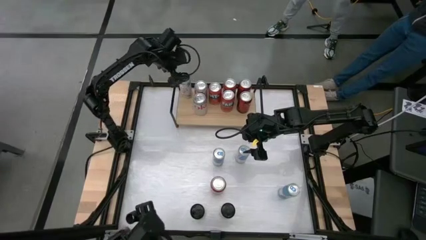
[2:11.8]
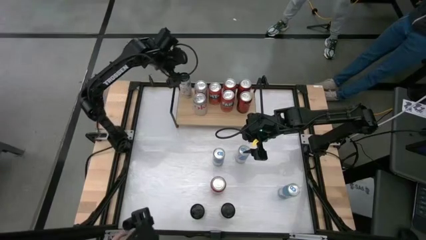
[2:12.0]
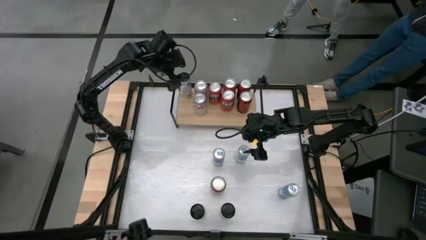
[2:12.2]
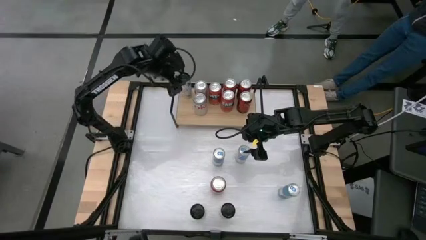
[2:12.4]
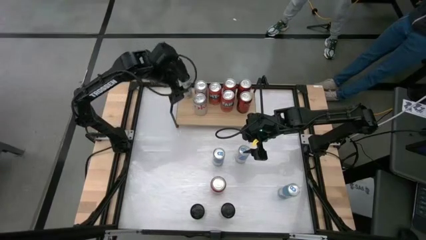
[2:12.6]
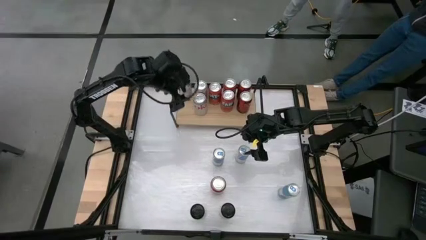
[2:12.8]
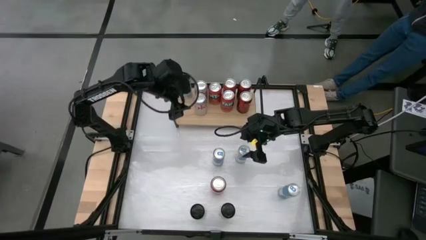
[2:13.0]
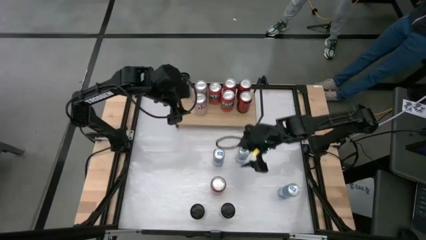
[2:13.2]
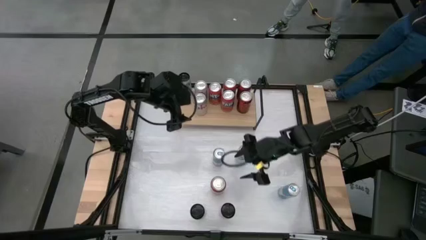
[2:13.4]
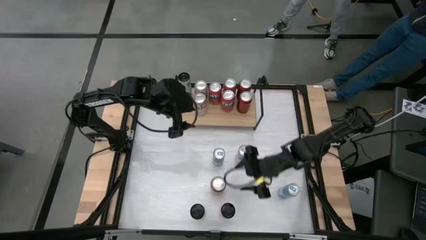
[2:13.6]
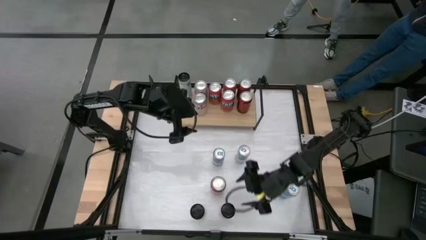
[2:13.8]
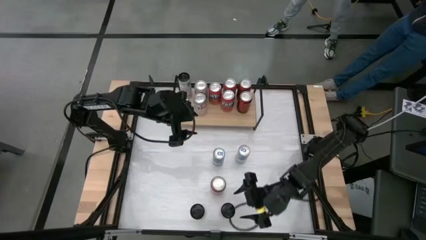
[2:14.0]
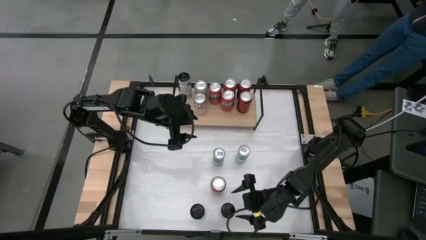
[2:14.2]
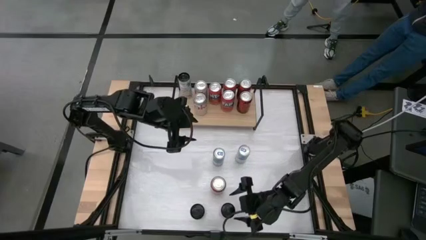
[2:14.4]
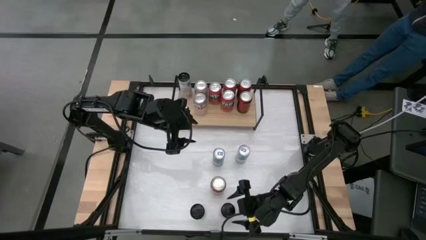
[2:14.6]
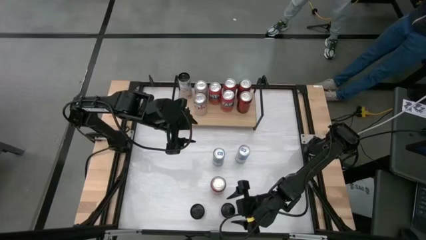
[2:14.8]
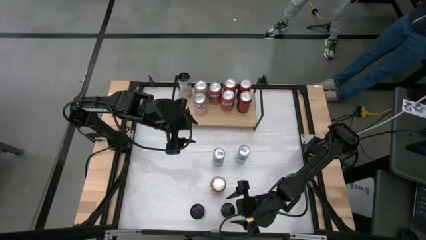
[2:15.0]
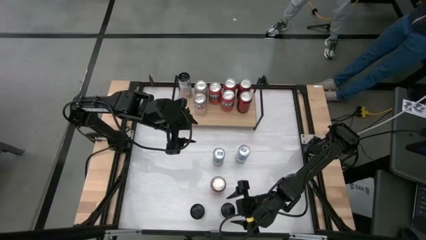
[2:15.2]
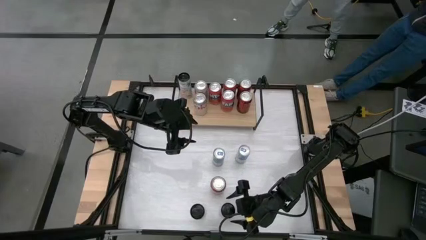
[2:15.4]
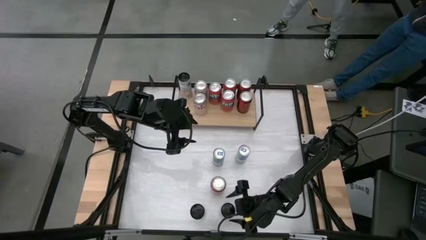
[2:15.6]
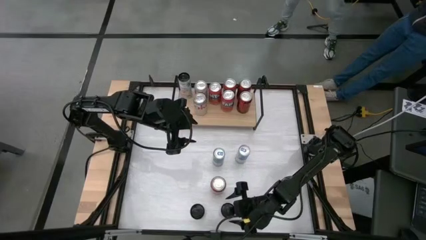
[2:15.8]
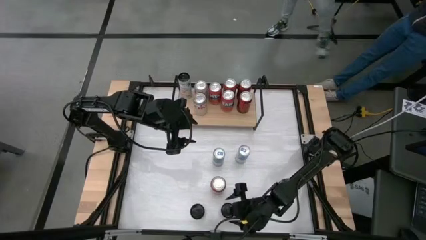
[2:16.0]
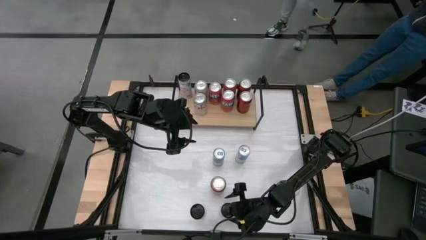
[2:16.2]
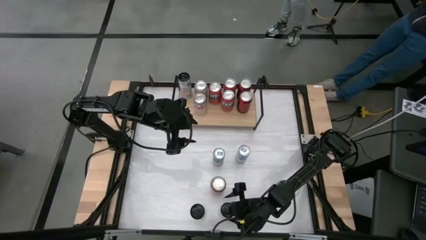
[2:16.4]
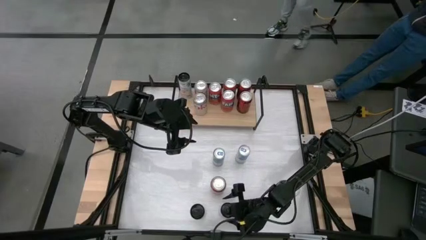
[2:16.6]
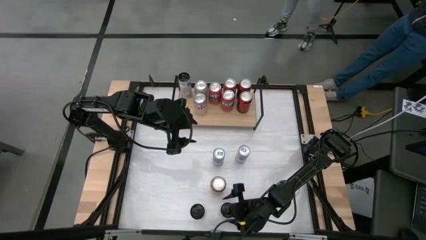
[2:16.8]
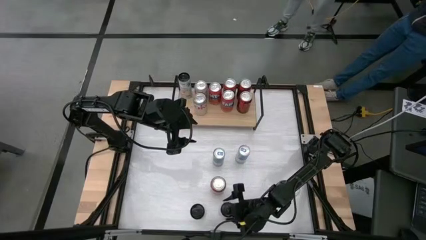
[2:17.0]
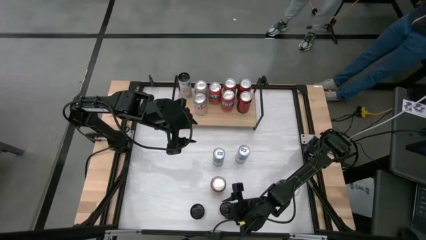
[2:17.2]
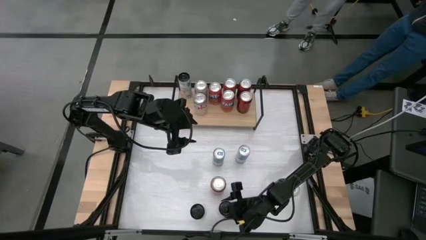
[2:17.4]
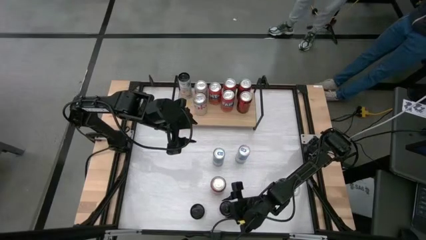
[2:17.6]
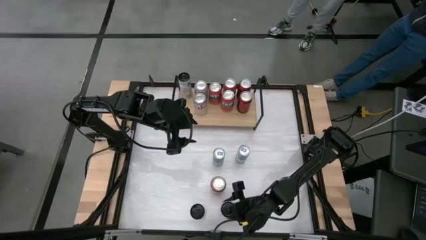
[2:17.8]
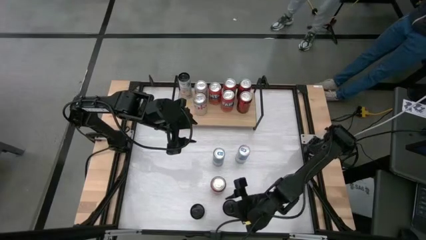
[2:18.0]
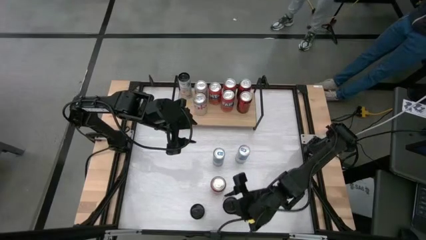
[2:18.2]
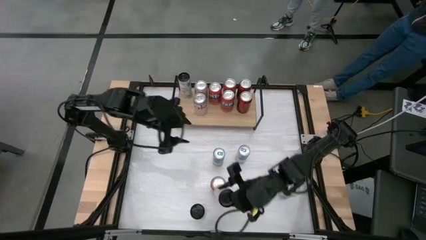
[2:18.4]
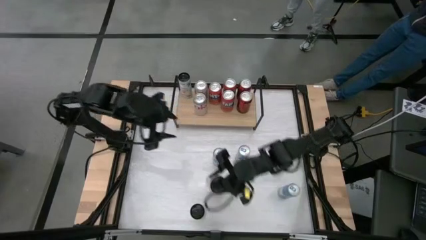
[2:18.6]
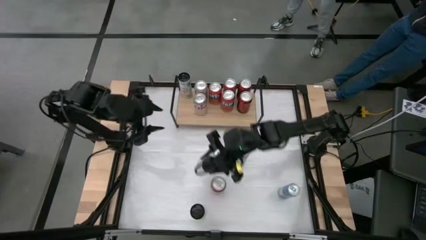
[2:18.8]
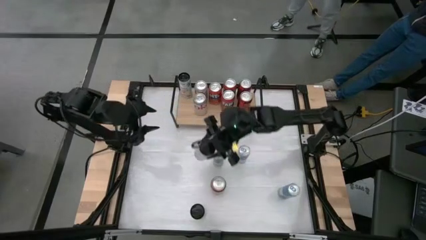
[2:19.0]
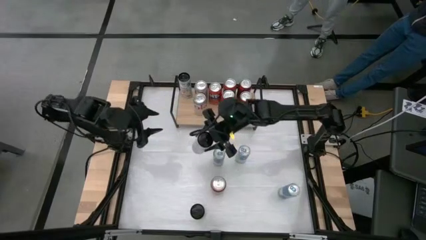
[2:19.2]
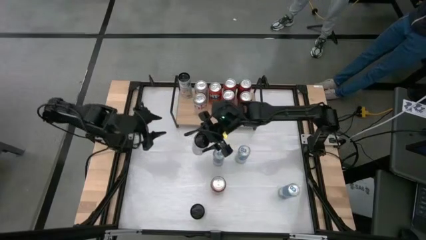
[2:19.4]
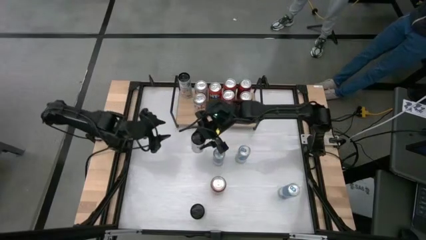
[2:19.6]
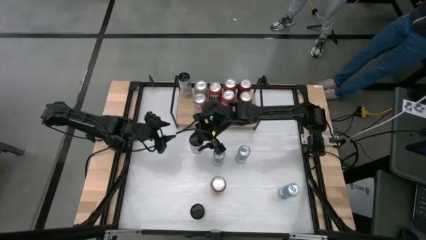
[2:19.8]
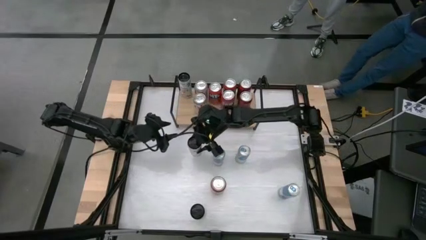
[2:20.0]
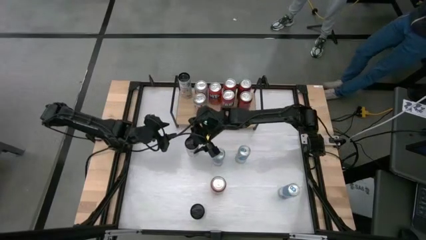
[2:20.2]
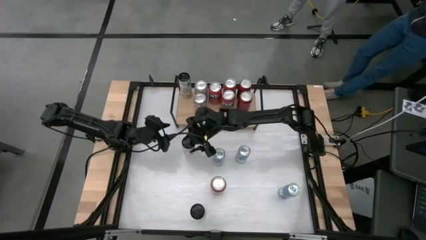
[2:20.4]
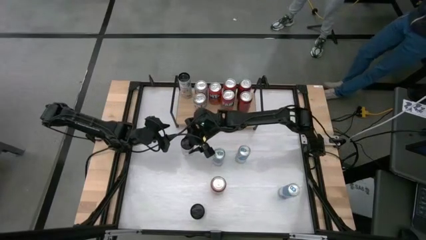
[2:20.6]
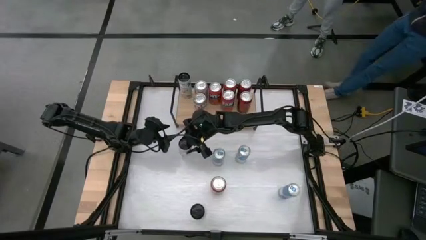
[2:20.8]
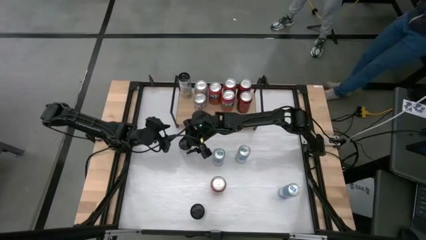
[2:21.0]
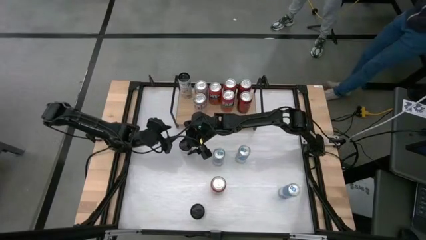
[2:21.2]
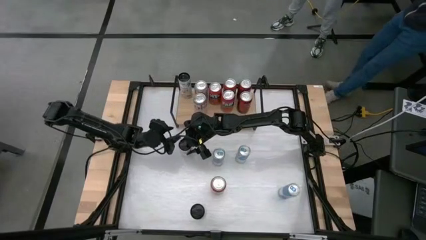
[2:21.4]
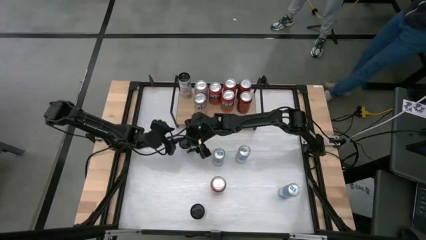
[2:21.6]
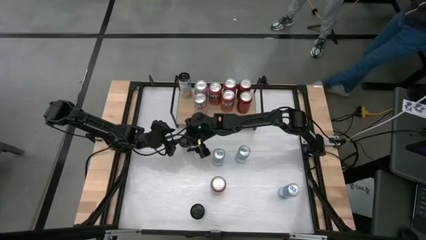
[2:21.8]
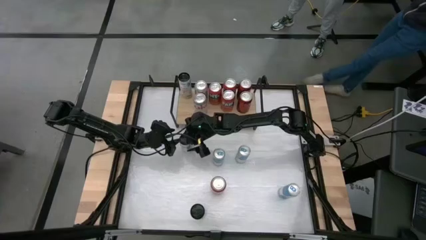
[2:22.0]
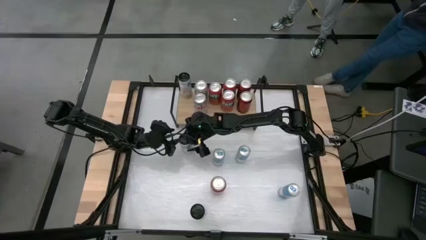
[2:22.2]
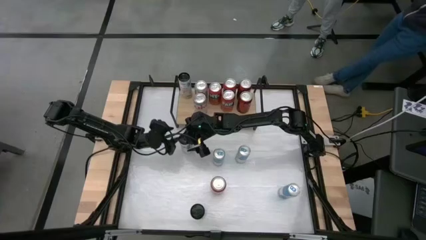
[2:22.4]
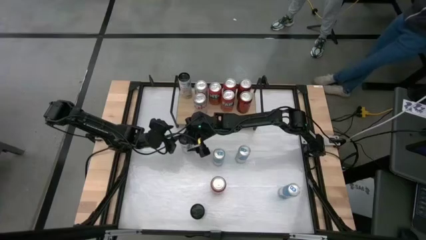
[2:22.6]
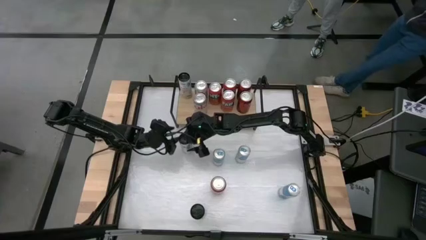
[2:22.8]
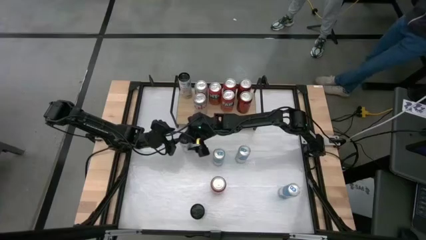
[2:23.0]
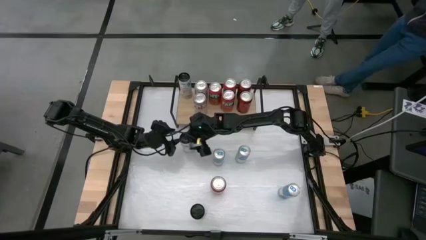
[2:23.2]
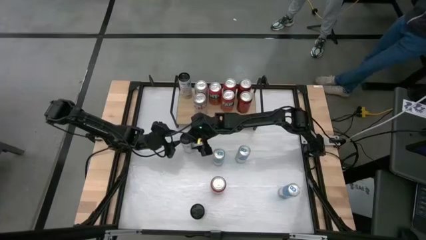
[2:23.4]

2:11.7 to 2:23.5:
Task: Place canned beverage on shelf
Put the white and pink soda can on the shelf aligned with other white and pink soda can
